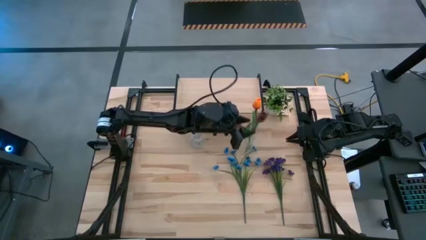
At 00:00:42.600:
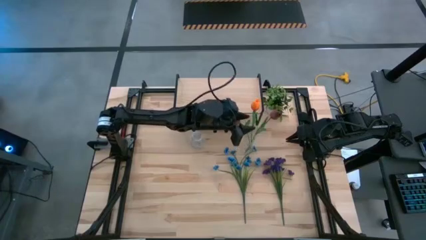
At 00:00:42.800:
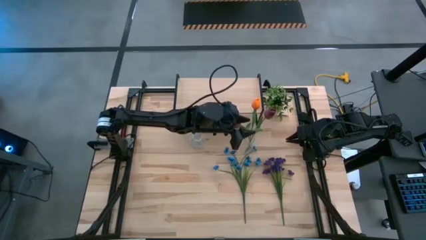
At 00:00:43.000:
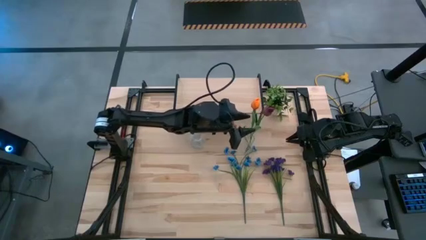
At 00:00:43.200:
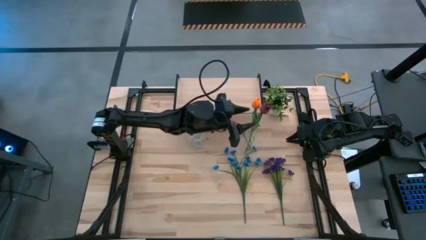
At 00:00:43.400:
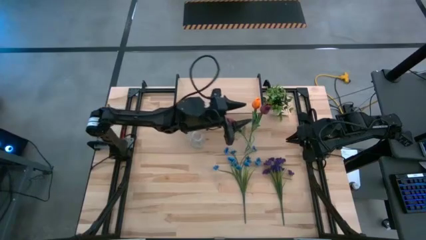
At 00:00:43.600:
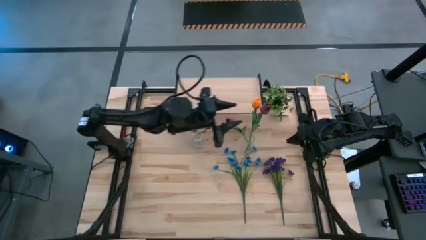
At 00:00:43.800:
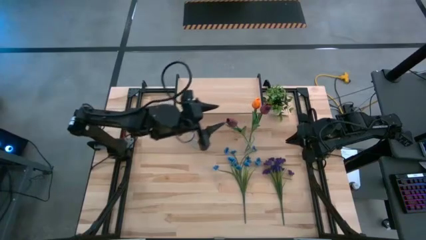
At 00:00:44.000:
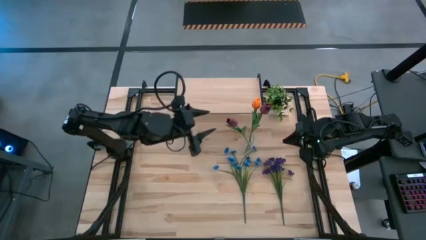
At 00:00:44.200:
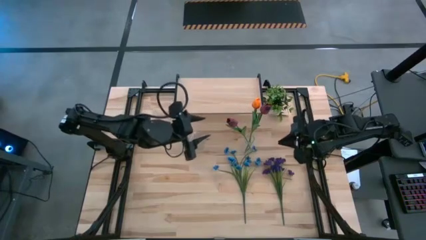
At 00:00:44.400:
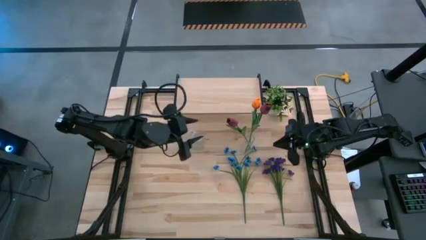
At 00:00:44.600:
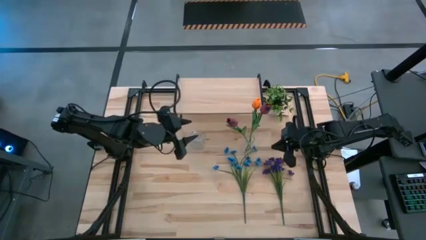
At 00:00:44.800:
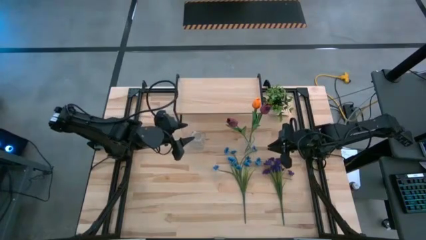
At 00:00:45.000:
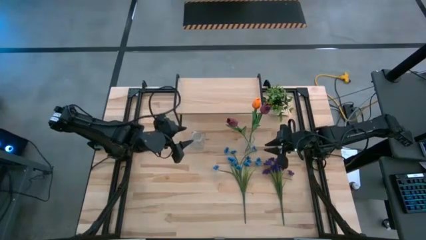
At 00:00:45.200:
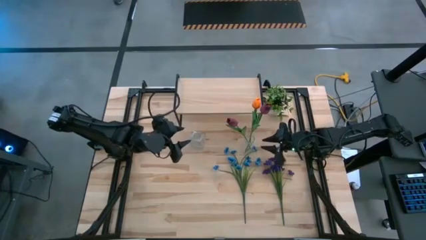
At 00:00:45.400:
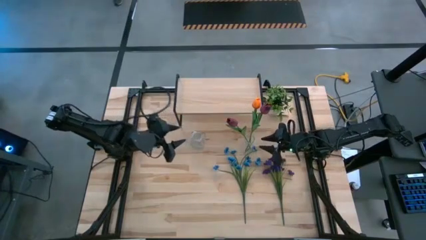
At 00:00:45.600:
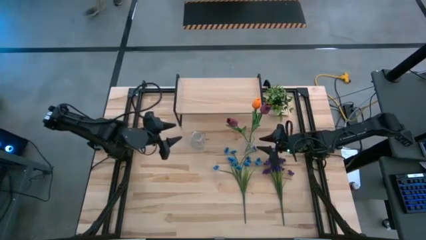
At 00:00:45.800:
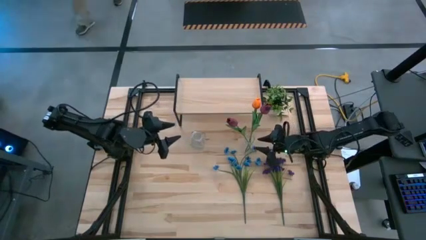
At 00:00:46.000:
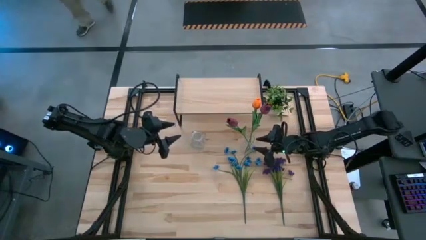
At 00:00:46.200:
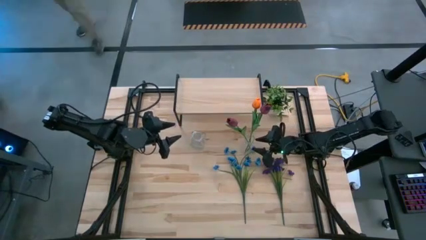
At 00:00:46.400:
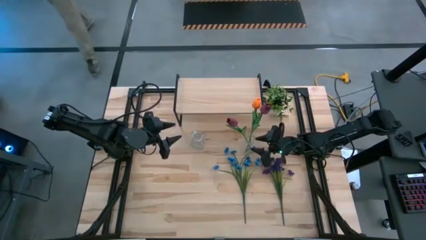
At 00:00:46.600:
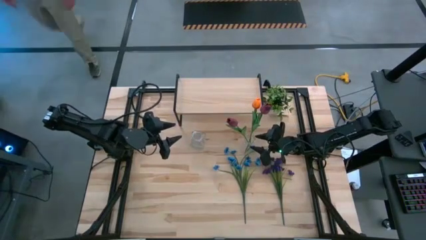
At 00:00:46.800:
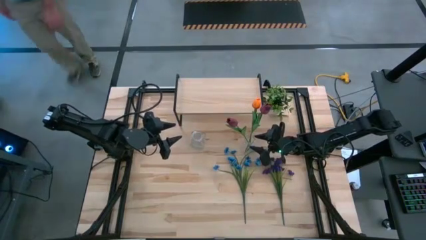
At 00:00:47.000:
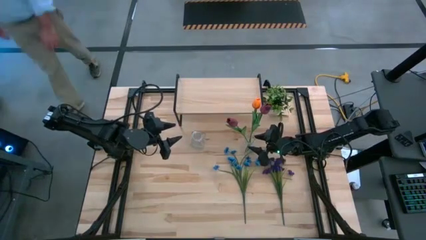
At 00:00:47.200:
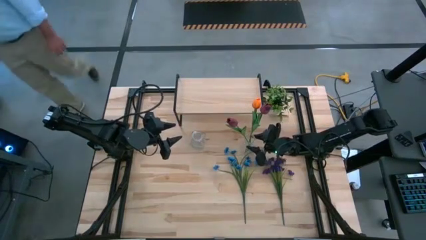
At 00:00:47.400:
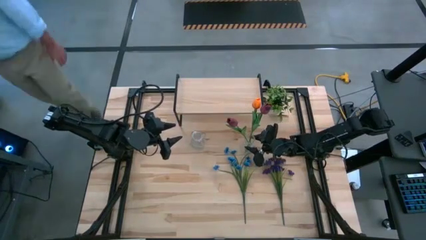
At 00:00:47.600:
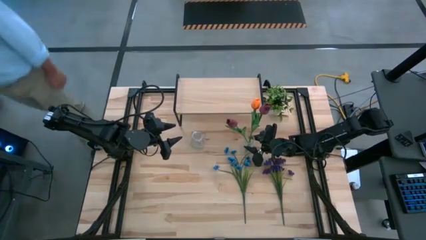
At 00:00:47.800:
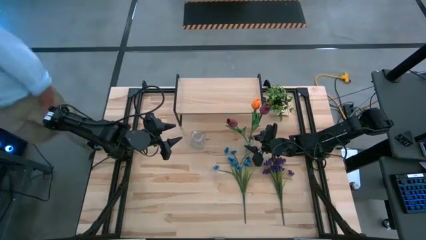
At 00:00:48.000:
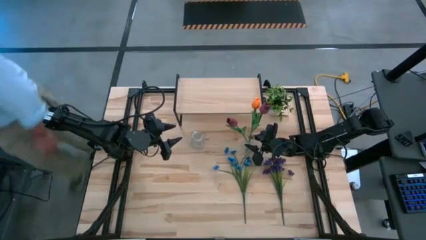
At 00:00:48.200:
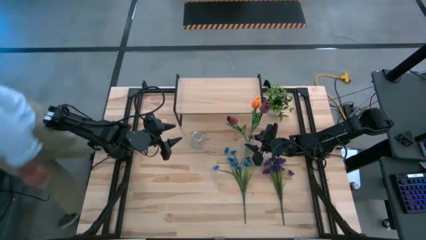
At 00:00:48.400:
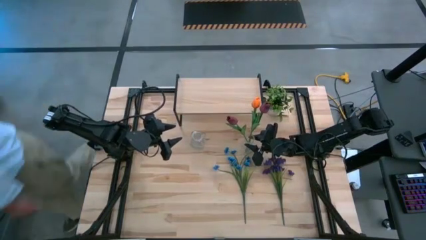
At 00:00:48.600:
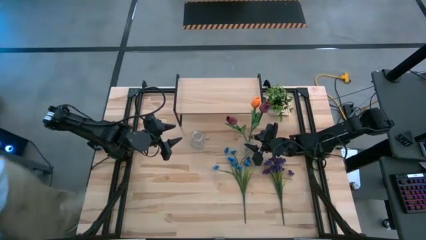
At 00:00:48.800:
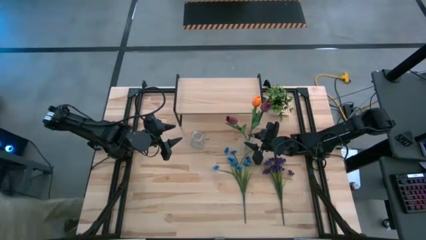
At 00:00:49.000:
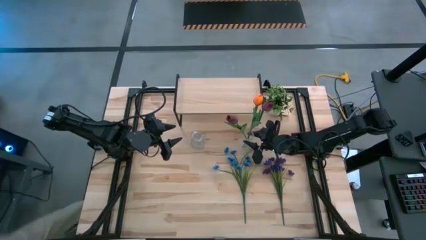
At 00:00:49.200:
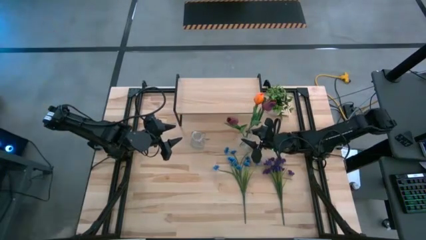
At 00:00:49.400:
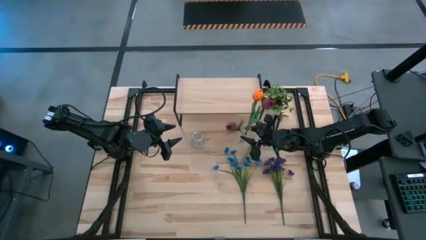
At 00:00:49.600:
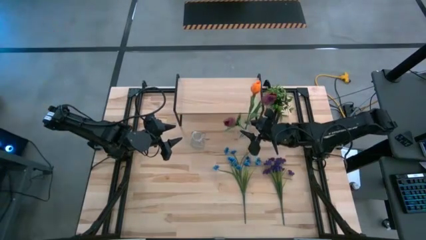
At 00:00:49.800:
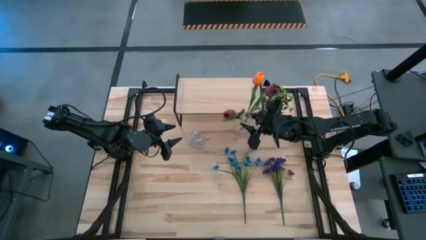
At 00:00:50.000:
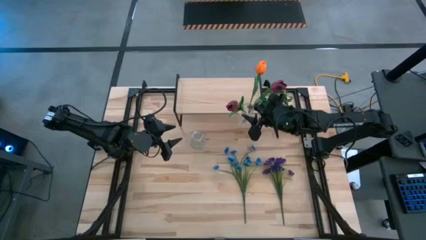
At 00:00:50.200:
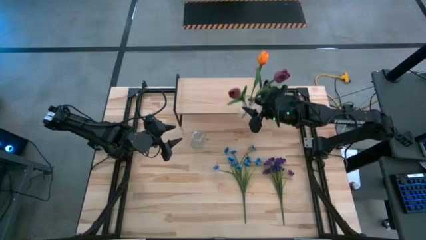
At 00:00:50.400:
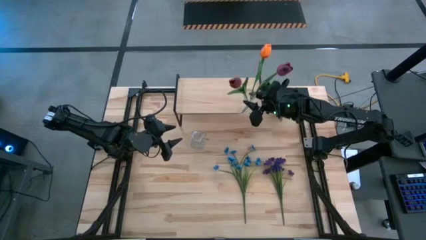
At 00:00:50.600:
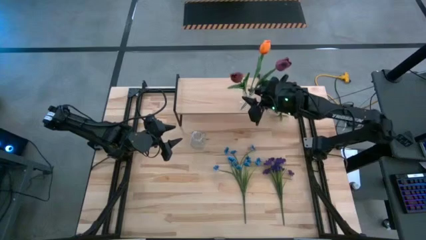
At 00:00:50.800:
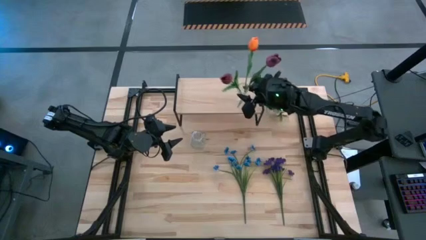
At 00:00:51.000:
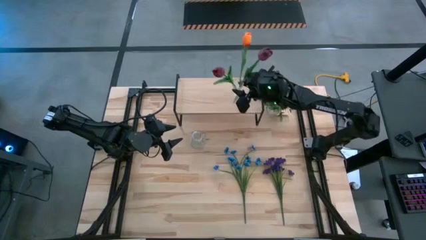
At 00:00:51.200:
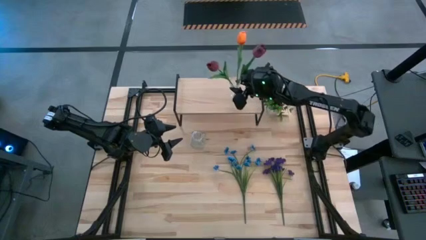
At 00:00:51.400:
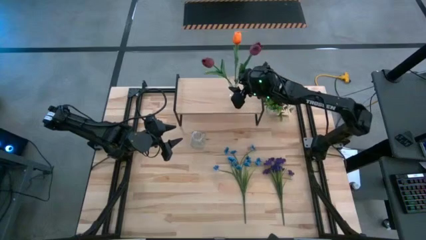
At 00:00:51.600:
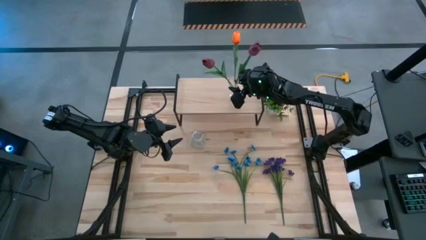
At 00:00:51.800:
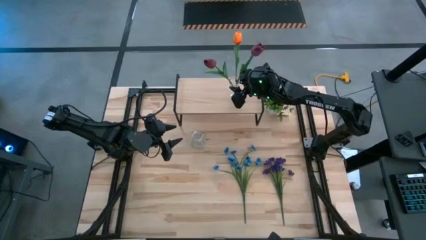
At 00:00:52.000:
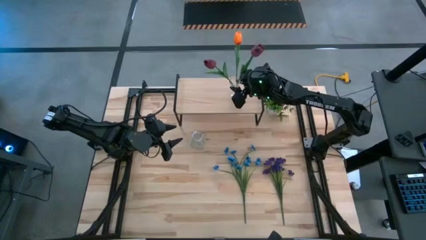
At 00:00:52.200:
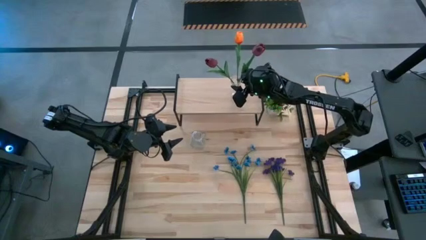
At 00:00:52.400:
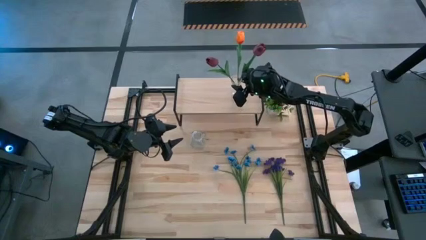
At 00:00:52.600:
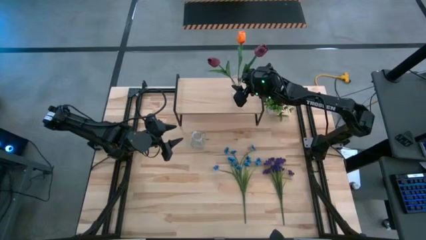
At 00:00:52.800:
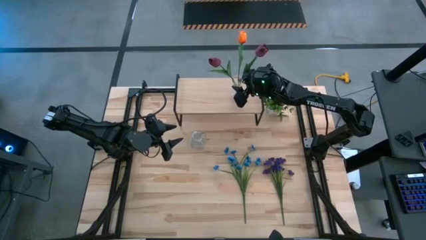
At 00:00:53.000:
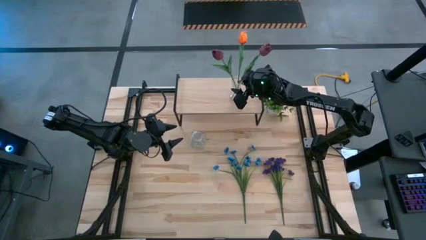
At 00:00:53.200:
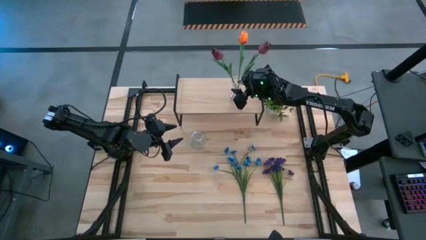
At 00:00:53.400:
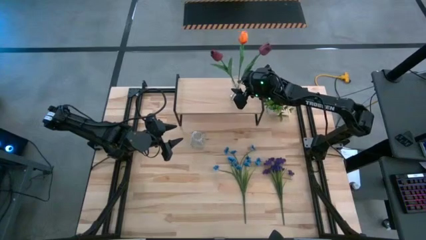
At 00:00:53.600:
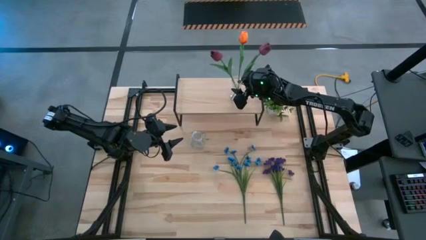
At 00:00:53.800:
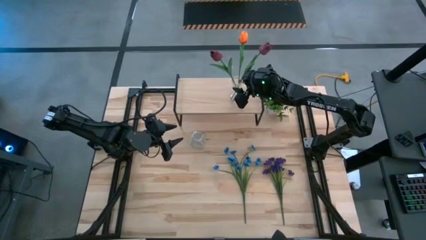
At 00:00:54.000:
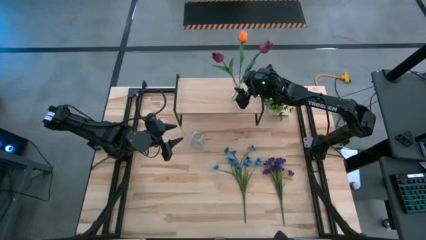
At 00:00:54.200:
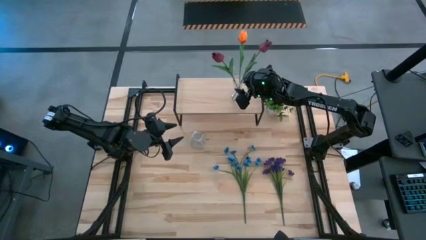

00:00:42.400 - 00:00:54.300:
Task: Pick and place flowers into a vace then onto a shelf
Put the right transparent vase with flowers on the shelf
